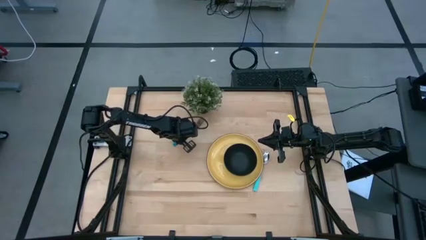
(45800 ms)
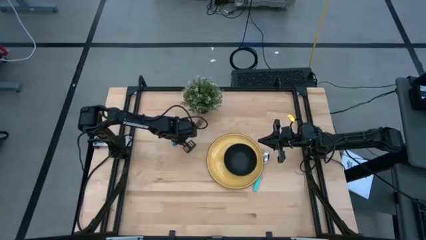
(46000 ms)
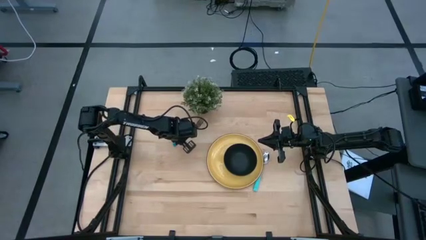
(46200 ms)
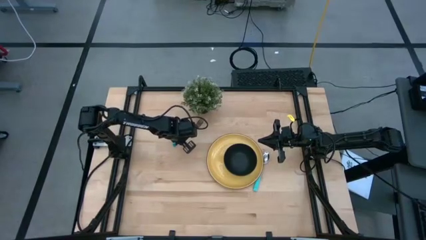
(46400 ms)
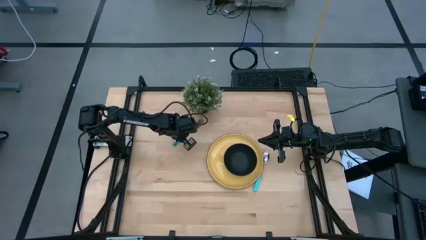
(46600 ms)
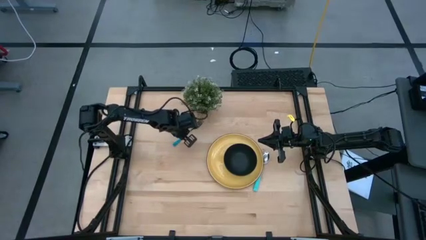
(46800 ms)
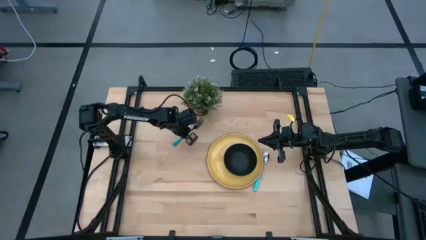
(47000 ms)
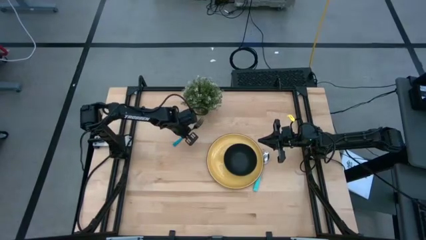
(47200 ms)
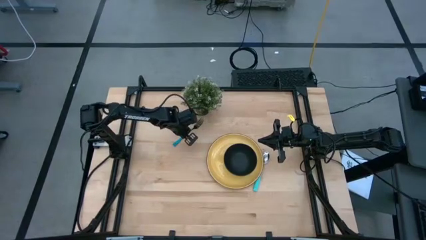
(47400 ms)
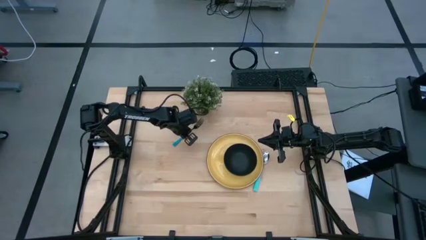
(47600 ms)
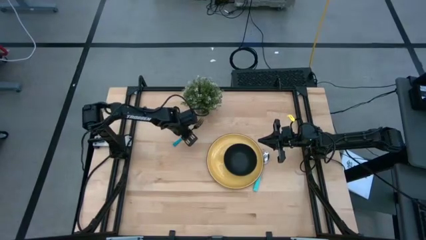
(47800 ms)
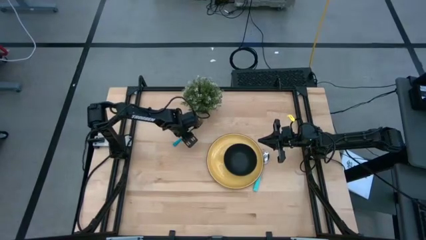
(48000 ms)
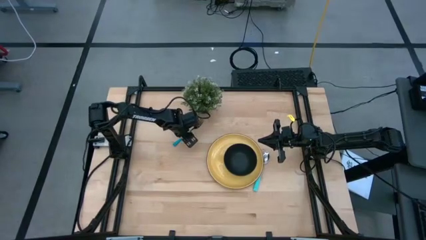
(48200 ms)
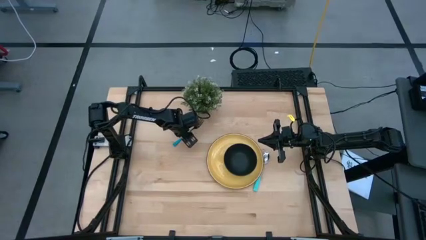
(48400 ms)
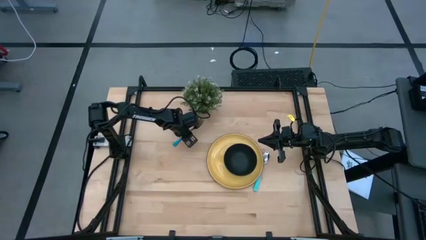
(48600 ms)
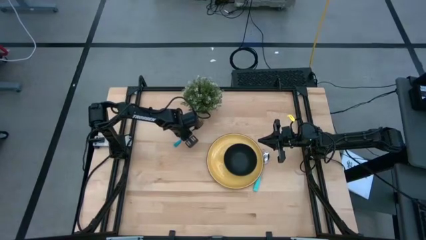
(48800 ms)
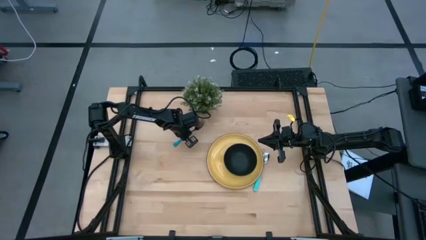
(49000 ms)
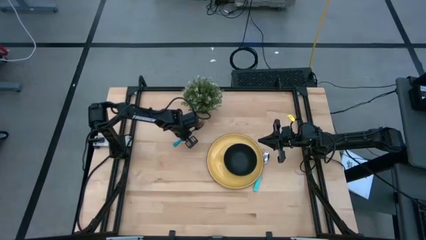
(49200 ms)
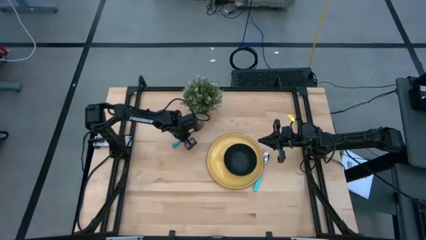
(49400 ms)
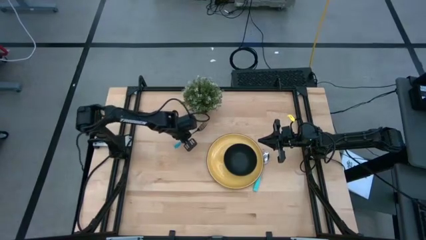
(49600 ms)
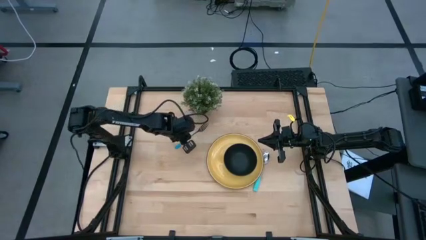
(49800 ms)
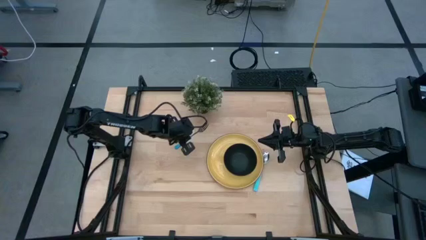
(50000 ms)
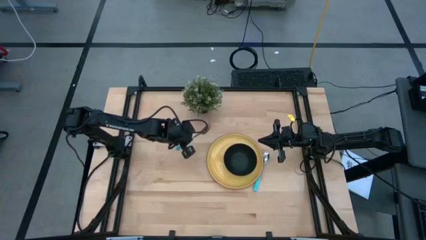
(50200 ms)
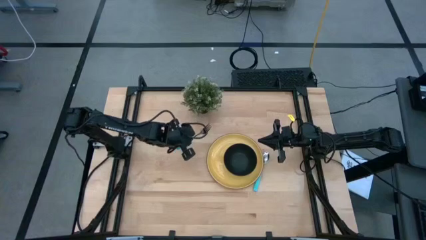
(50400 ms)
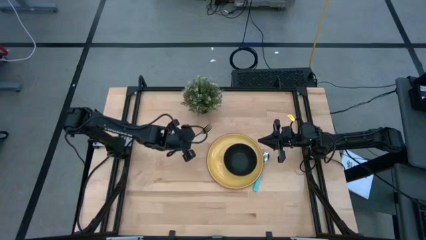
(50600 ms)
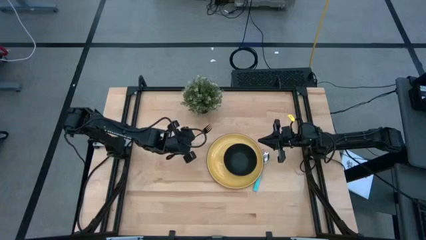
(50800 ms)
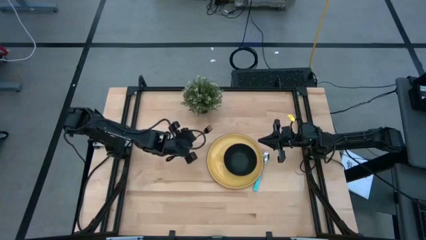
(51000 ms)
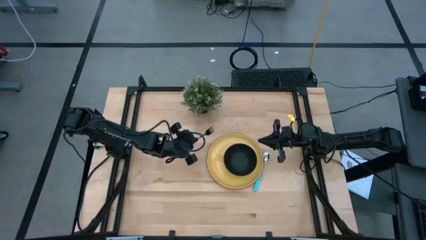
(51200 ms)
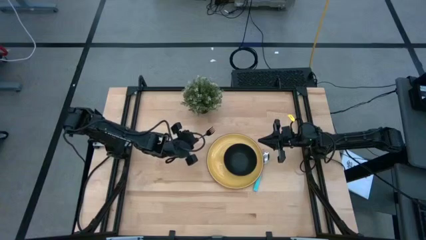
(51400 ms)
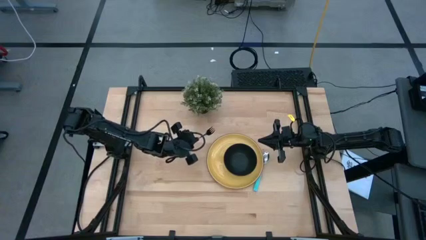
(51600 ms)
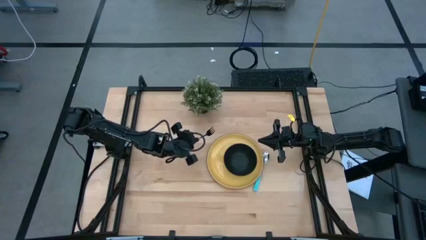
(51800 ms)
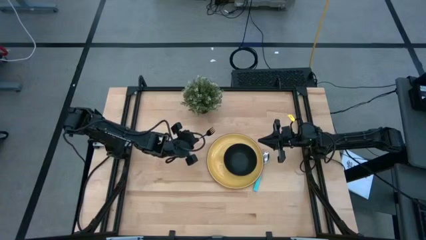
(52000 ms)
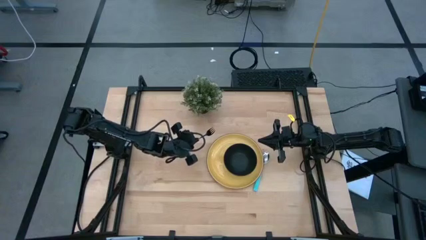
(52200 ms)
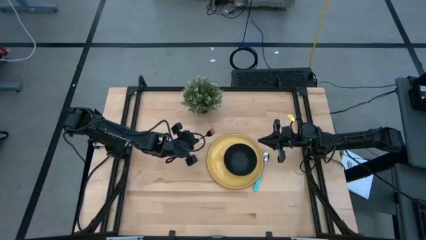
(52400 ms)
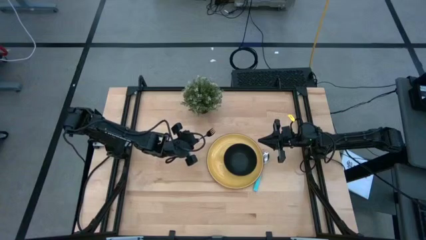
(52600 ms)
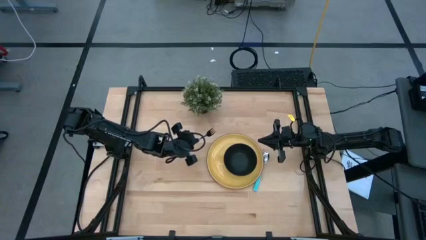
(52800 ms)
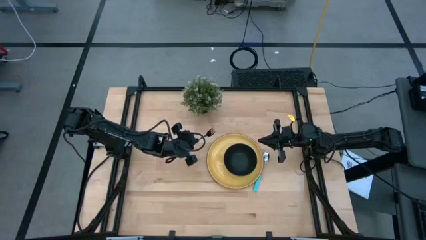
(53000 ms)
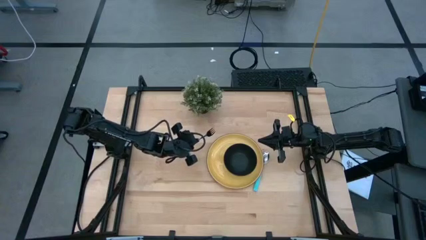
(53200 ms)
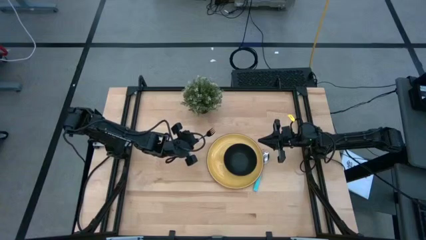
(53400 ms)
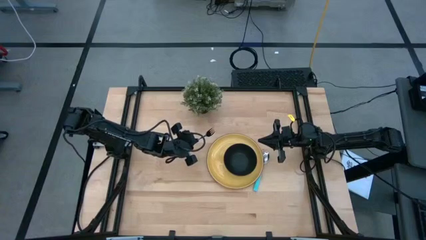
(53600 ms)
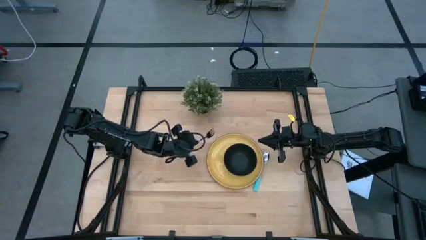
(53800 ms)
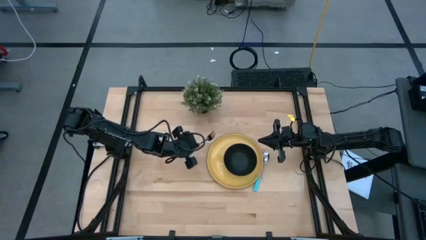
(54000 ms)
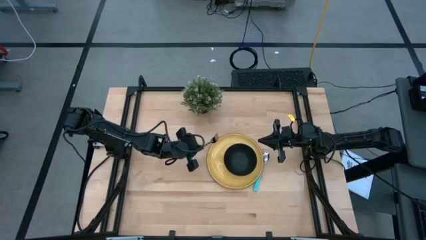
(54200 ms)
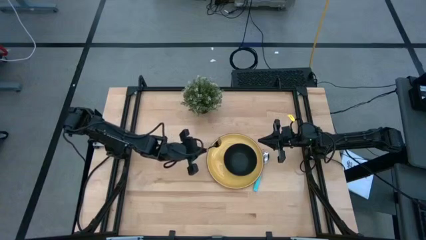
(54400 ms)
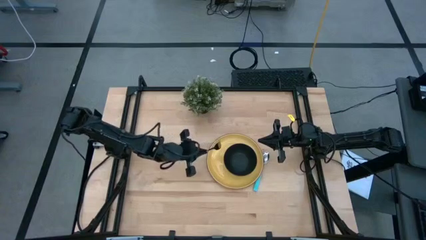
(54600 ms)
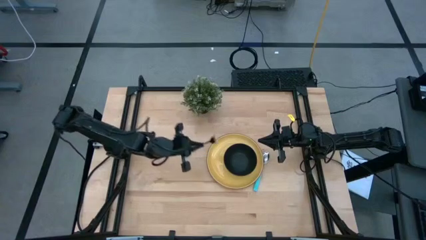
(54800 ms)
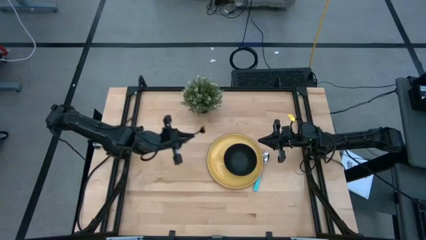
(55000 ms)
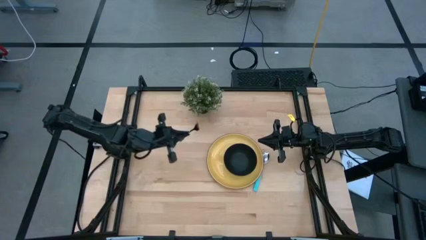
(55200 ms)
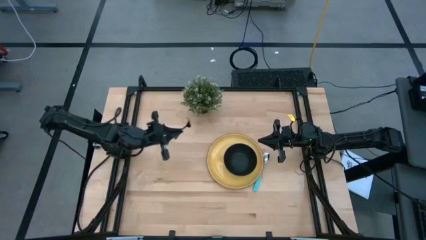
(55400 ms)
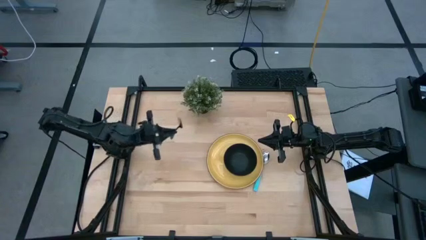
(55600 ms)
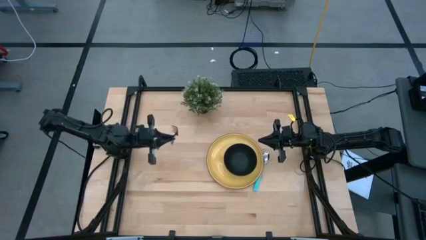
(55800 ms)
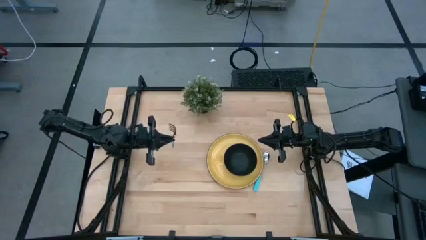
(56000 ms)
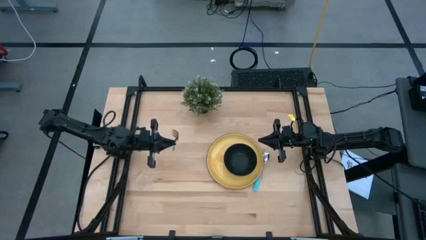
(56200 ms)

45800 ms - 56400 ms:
Task: Set table place
Put the blue fork on the yellow plate to the left of the black bowl

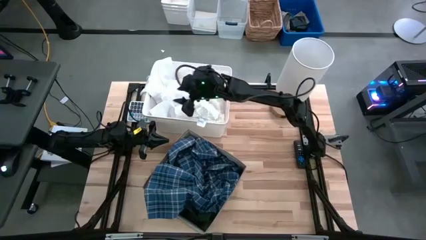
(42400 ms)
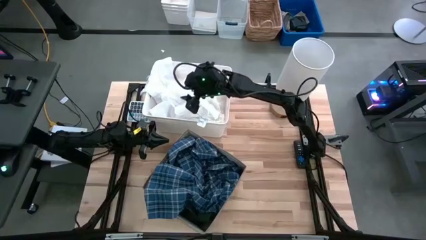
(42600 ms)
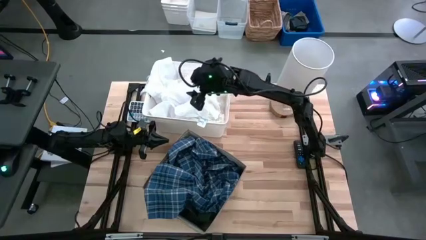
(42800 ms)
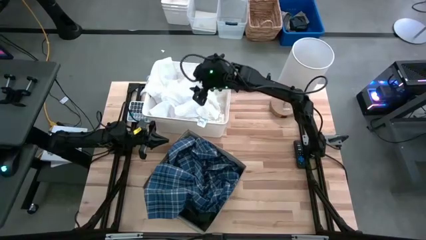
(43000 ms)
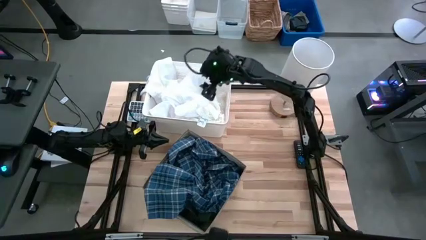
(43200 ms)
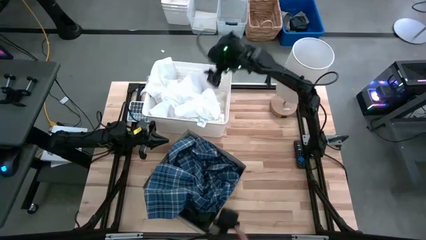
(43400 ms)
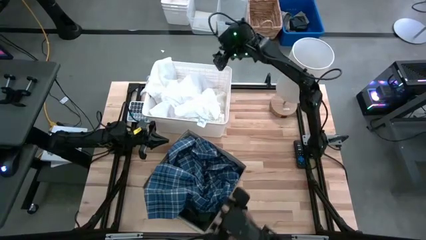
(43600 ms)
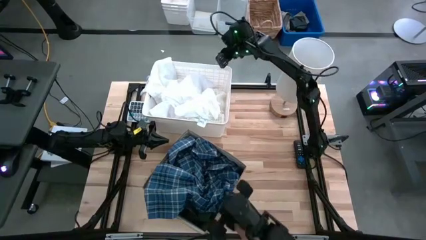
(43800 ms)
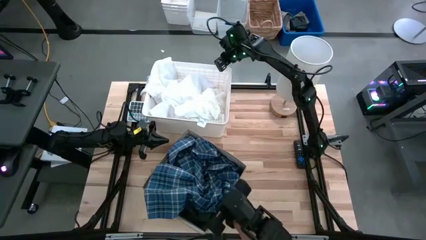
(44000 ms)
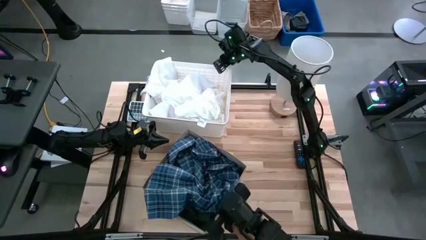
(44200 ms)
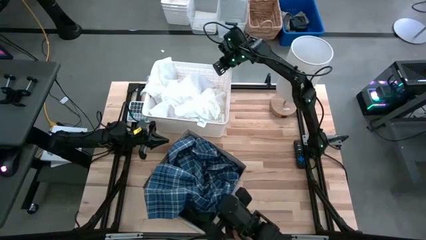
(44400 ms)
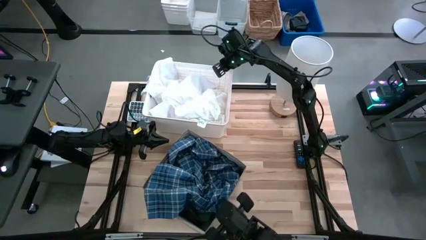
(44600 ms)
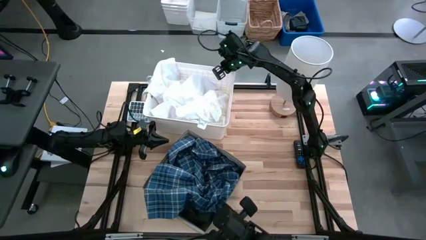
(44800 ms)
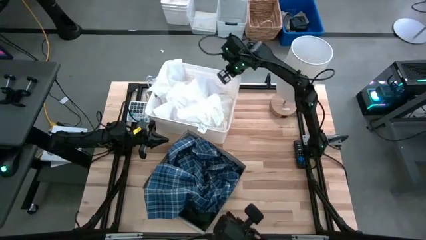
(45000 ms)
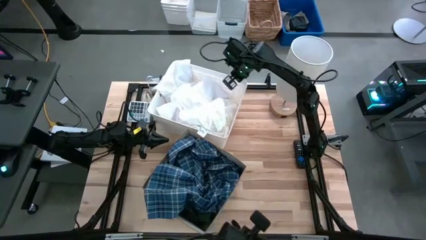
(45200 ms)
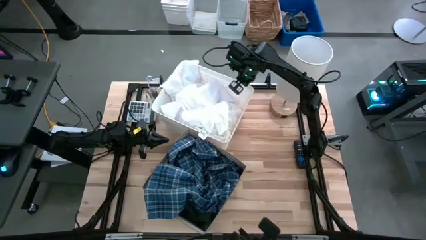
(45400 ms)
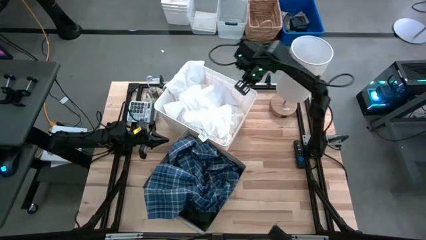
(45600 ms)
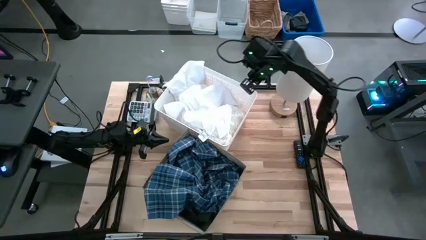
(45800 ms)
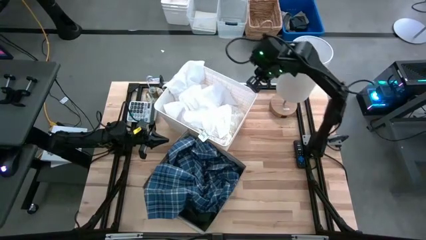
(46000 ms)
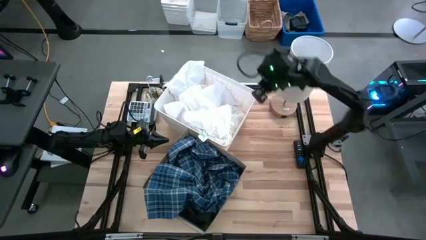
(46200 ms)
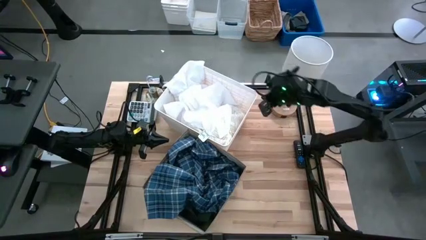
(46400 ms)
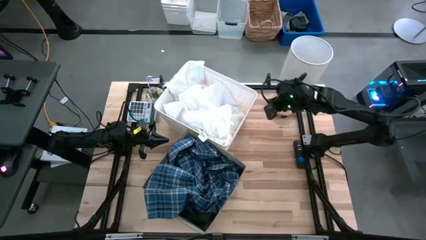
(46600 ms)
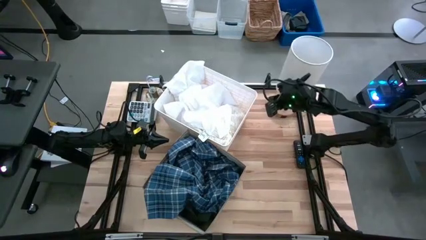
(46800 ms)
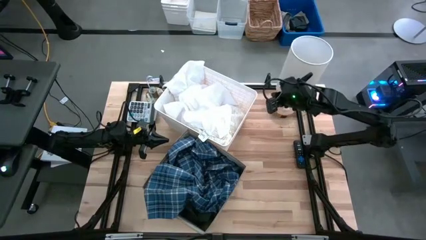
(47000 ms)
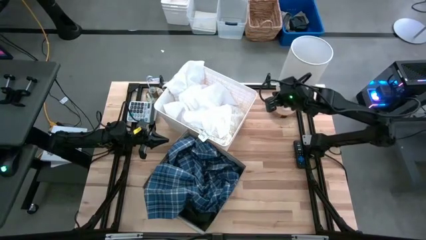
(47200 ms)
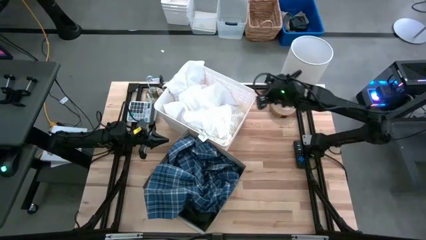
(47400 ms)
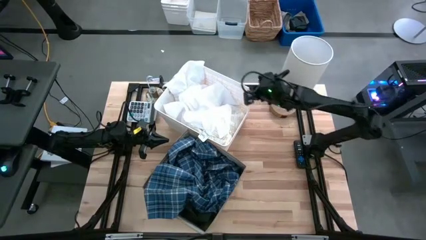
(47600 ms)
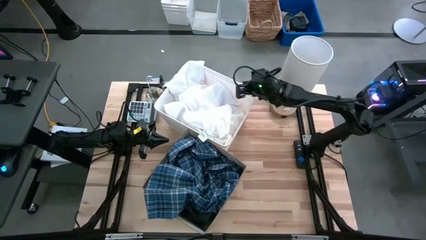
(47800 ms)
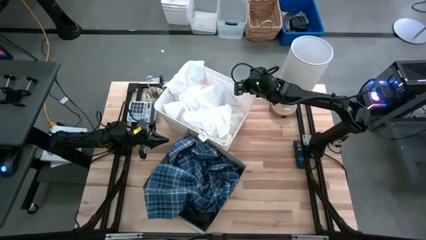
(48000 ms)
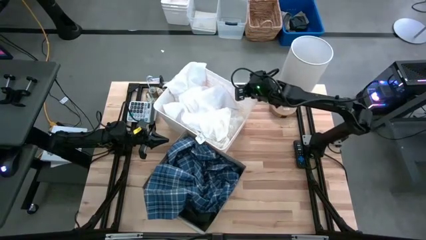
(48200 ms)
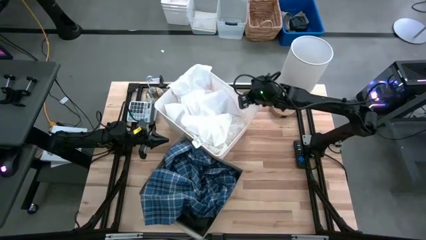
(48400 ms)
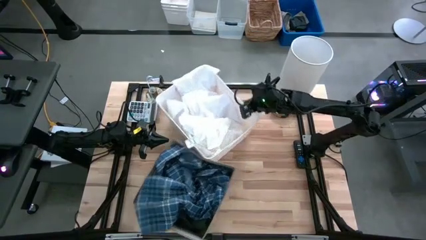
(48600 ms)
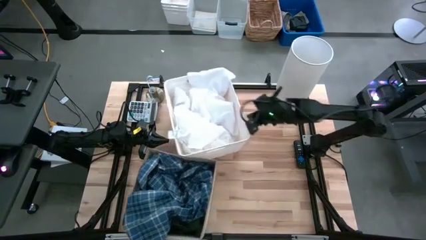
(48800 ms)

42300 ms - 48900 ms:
Task: Sort clothes
Return to Home Position
